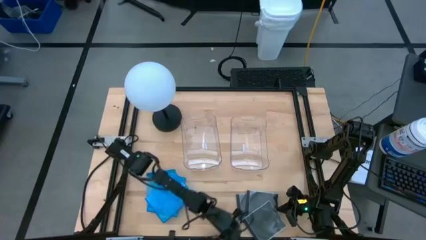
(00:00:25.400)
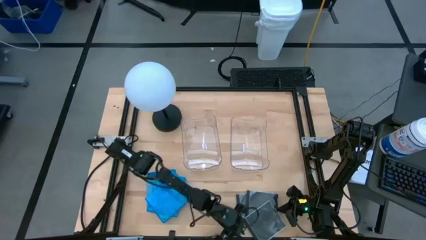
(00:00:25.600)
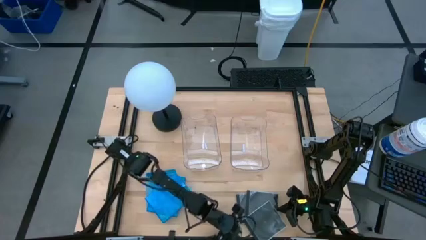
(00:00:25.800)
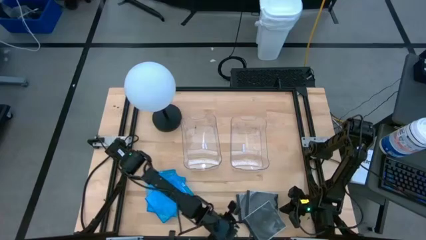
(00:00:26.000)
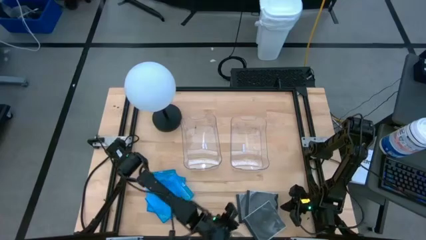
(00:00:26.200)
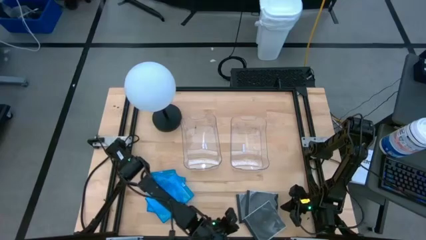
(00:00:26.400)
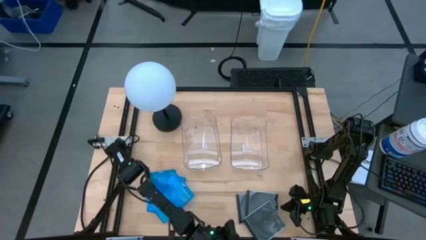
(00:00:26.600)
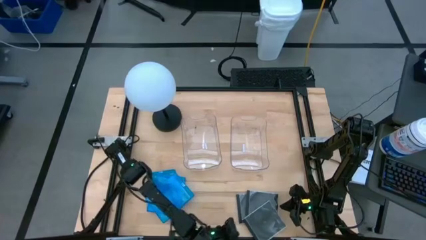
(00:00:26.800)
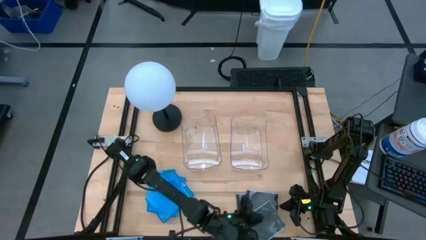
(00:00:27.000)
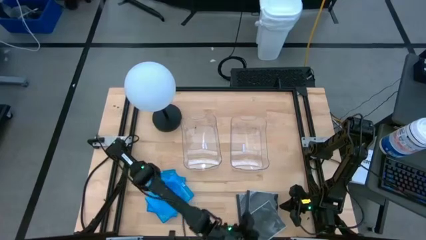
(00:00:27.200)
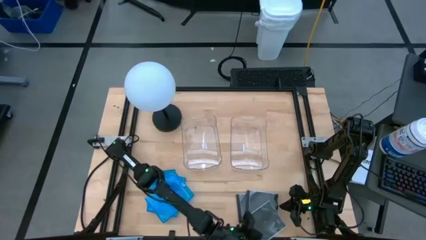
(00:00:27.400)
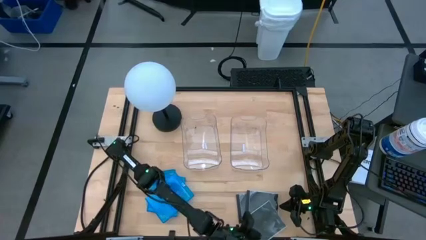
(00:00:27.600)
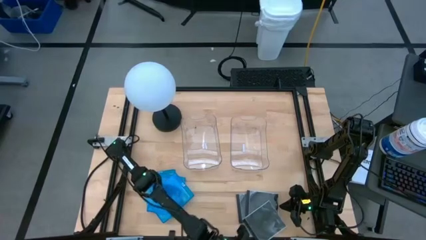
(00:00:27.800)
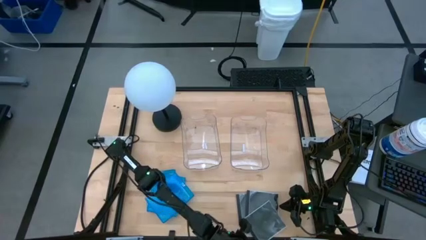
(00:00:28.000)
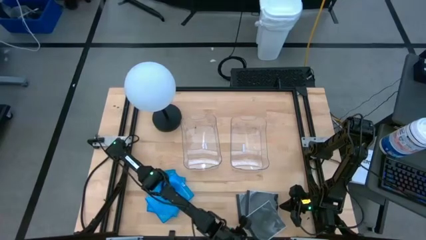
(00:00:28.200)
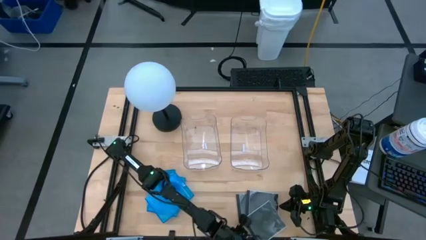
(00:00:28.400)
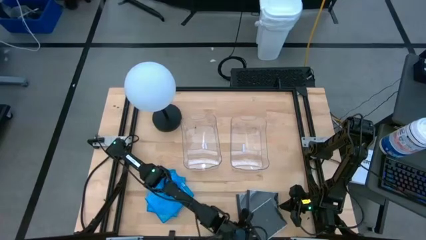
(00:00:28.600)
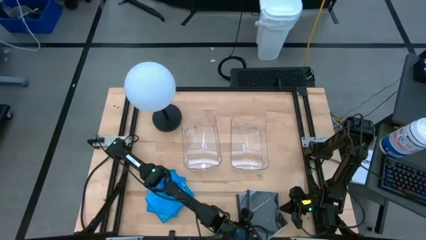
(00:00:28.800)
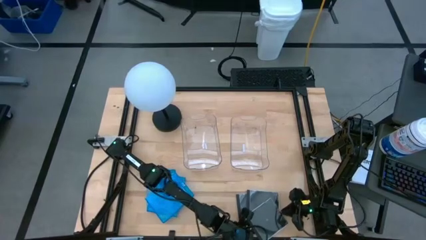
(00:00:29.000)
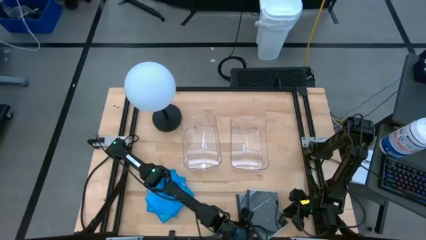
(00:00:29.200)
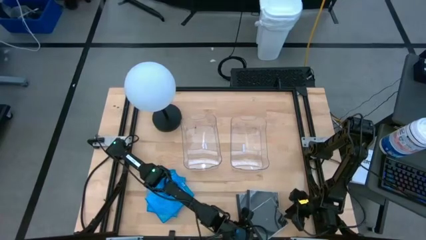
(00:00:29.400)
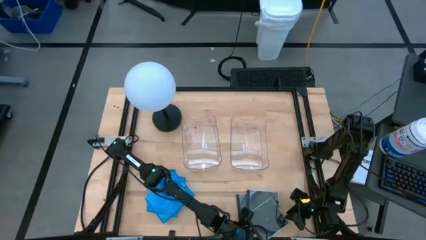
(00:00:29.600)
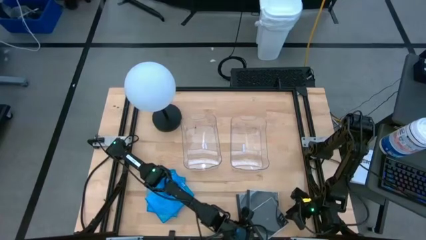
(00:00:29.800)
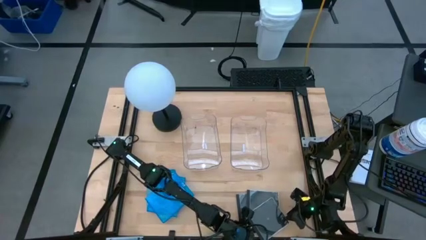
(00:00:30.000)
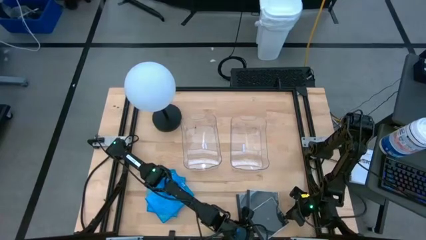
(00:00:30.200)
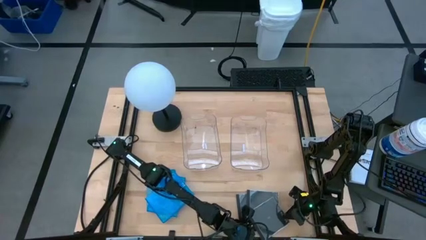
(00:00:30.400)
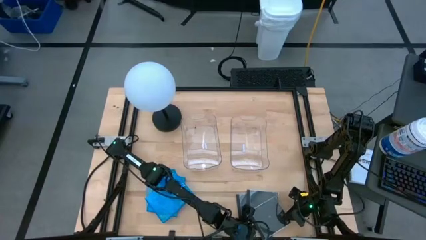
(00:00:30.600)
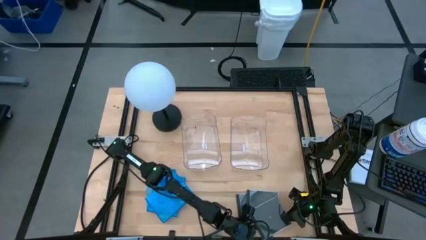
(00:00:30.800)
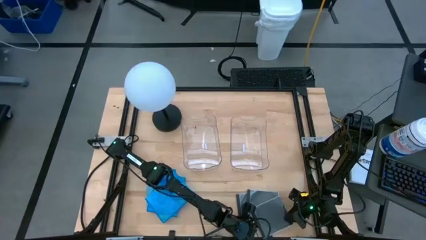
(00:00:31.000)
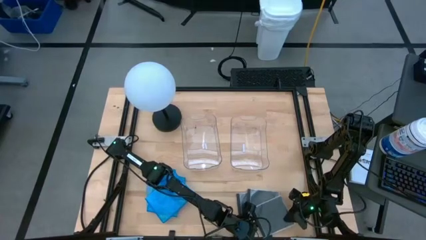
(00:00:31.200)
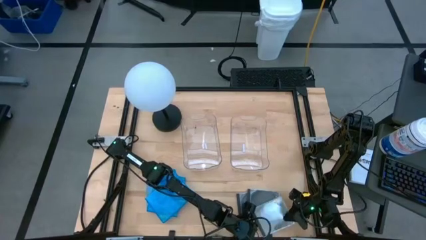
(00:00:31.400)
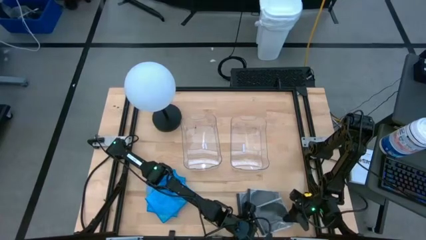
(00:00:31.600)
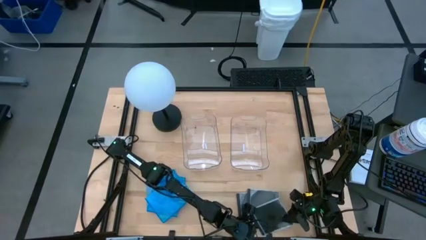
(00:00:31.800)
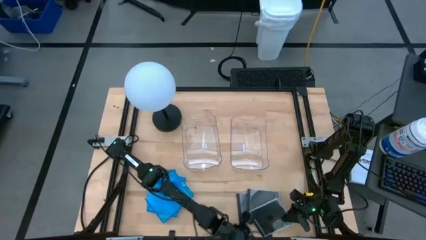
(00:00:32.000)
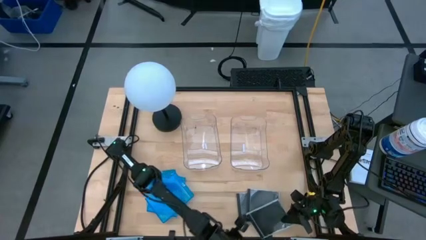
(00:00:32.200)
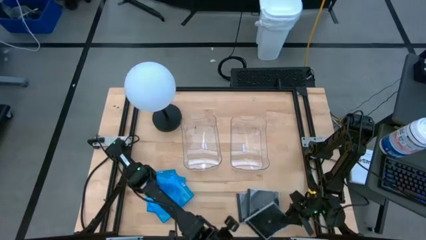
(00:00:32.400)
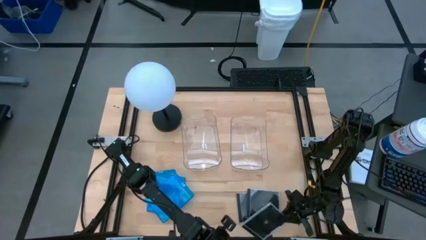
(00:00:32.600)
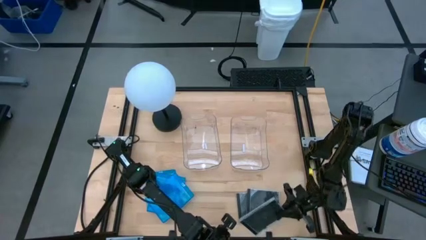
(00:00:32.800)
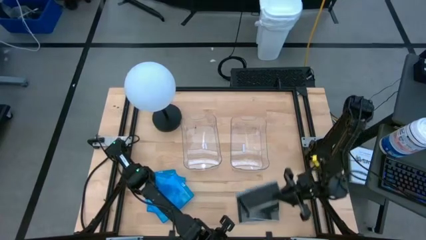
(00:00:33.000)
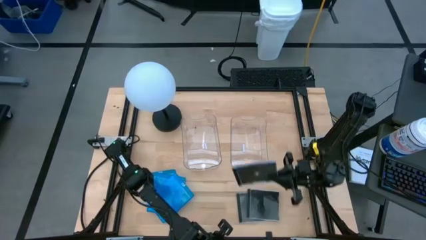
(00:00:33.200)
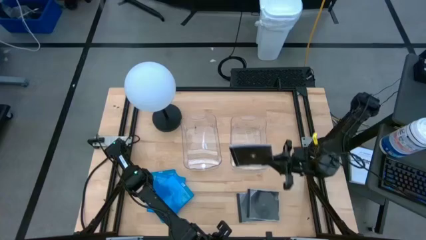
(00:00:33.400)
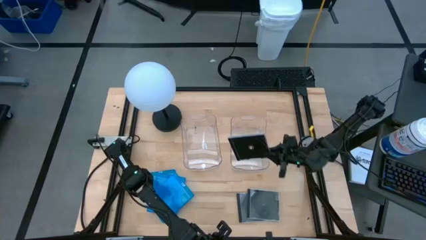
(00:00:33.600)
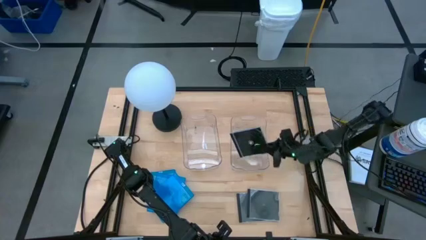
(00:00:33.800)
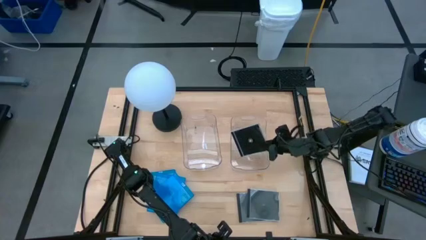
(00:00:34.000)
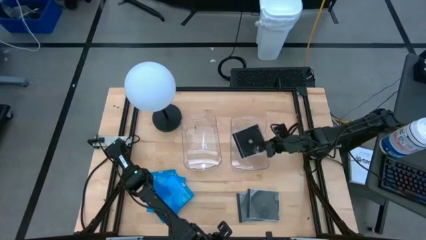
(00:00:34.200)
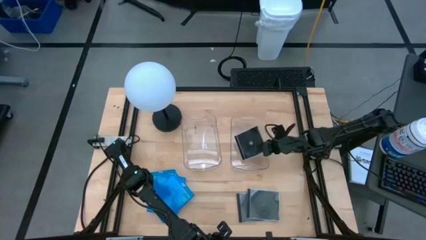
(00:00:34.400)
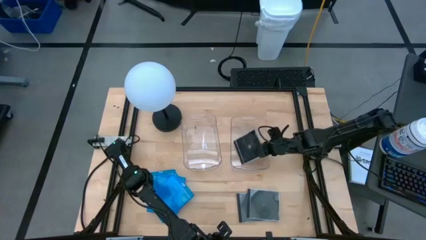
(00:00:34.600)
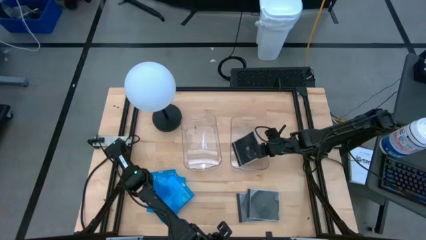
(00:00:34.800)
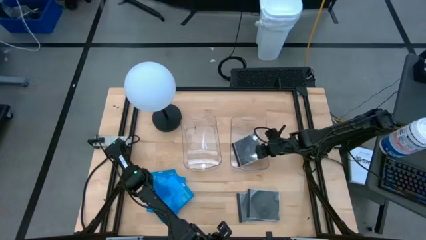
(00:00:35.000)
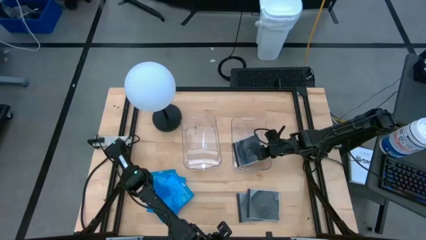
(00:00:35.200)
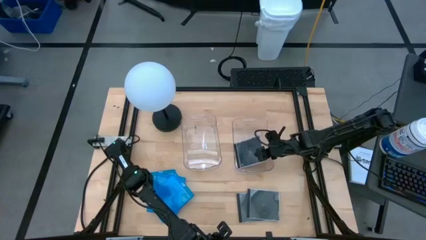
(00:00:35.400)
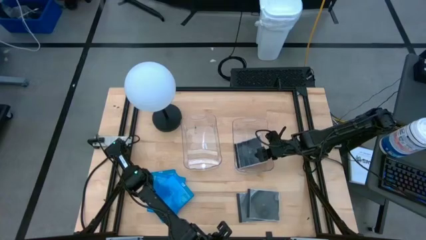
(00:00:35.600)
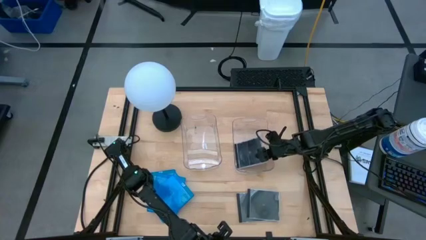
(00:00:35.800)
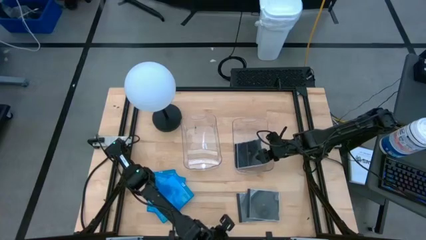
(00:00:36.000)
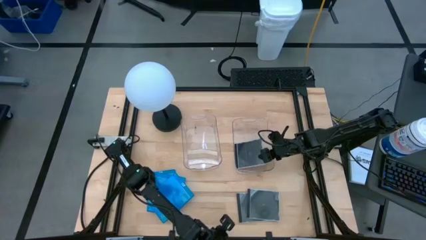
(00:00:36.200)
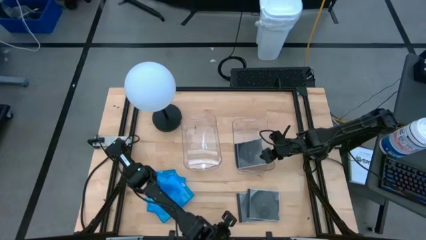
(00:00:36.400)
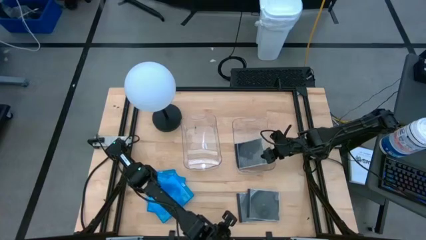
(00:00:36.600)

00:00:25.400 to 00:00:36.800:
Task: Pick & place jewel cases by type
Put the black CD case into the right transparent bin

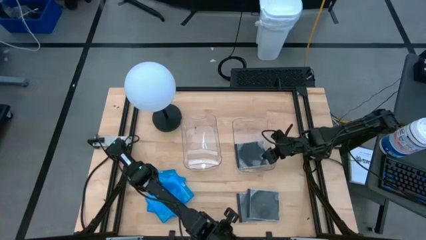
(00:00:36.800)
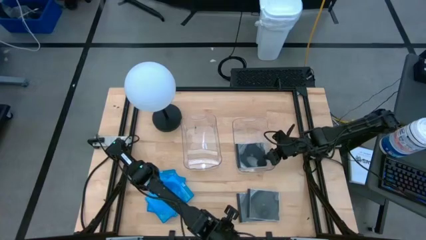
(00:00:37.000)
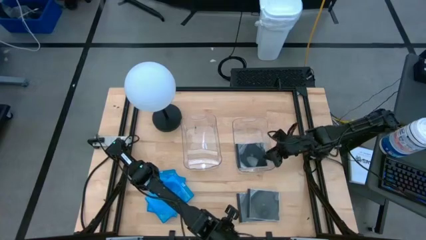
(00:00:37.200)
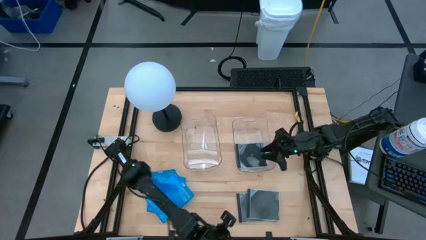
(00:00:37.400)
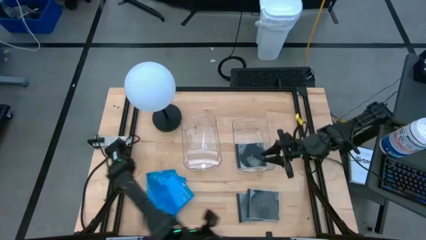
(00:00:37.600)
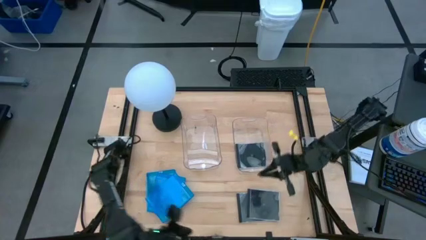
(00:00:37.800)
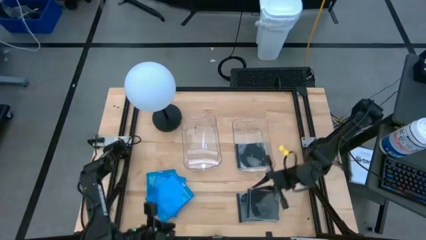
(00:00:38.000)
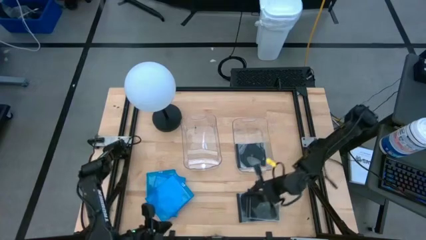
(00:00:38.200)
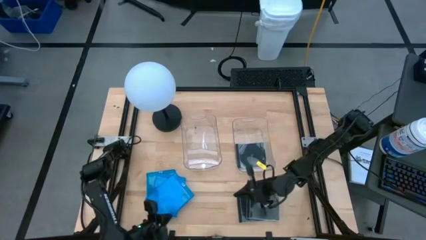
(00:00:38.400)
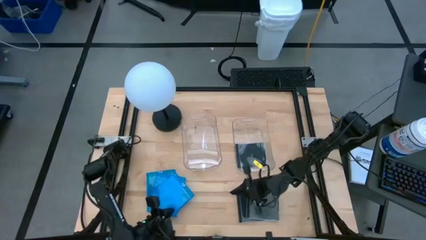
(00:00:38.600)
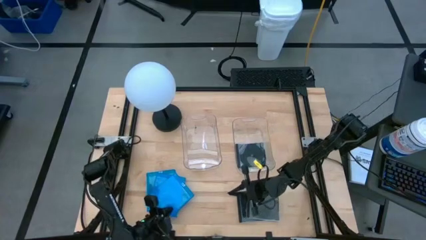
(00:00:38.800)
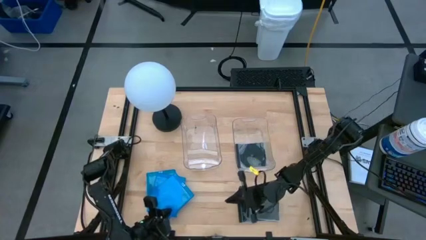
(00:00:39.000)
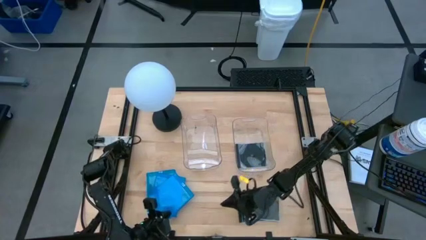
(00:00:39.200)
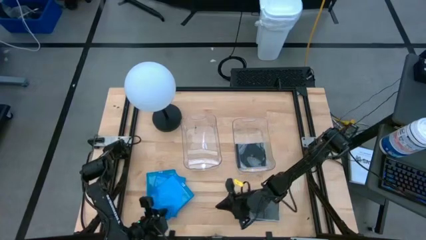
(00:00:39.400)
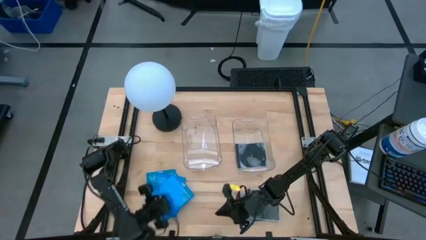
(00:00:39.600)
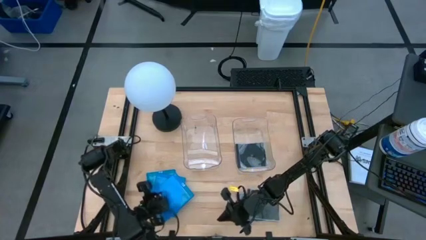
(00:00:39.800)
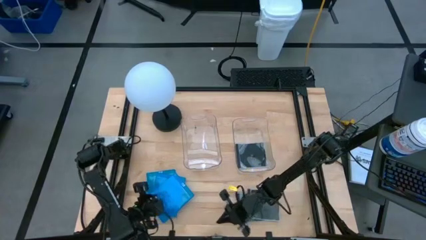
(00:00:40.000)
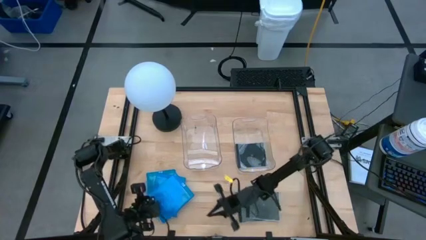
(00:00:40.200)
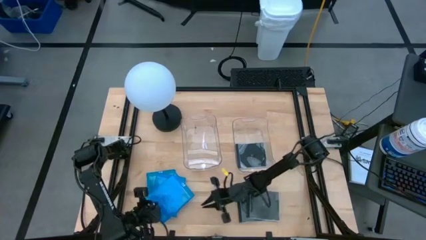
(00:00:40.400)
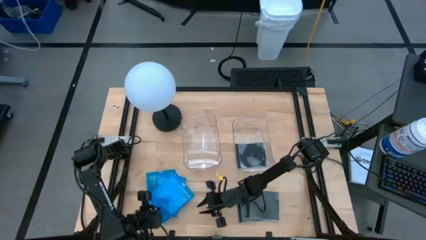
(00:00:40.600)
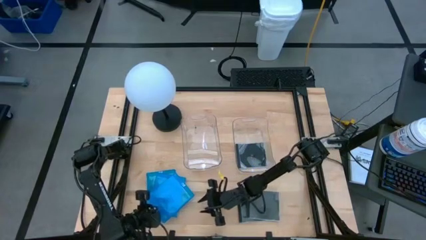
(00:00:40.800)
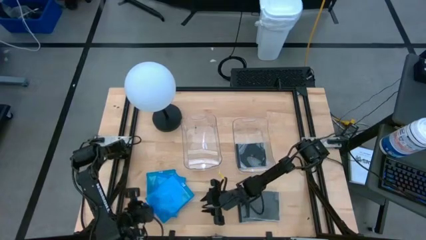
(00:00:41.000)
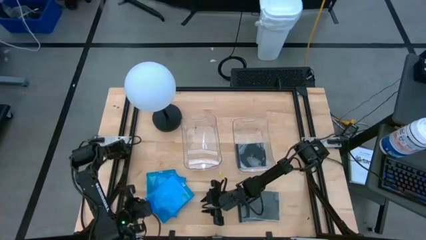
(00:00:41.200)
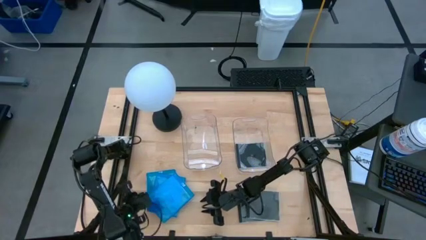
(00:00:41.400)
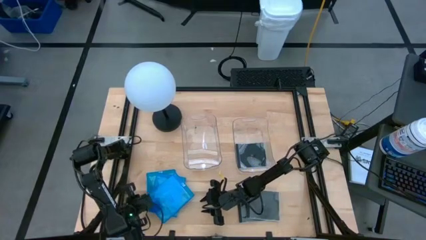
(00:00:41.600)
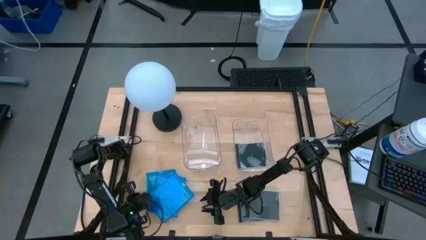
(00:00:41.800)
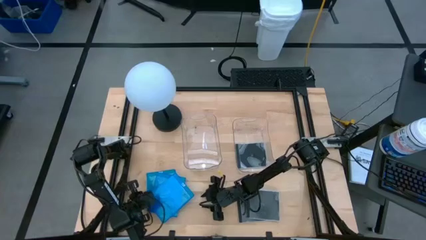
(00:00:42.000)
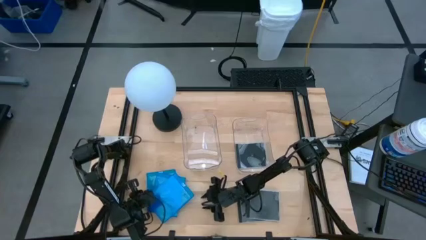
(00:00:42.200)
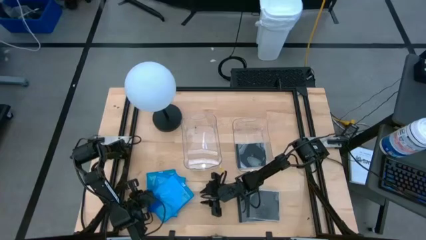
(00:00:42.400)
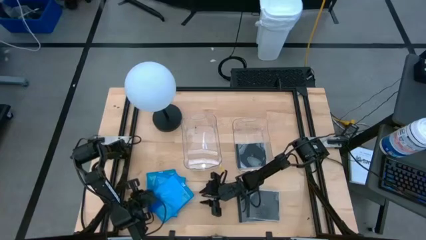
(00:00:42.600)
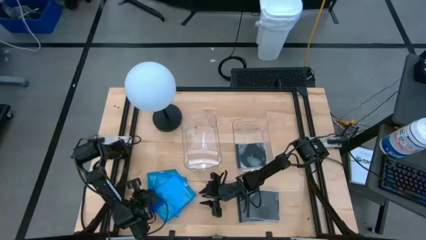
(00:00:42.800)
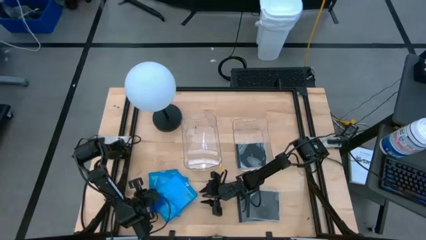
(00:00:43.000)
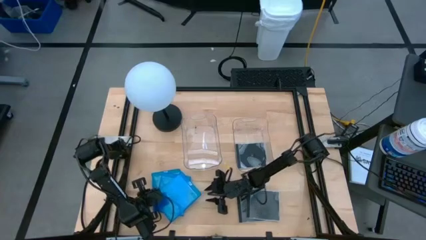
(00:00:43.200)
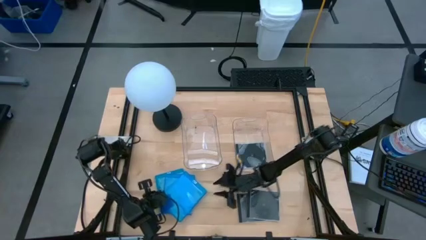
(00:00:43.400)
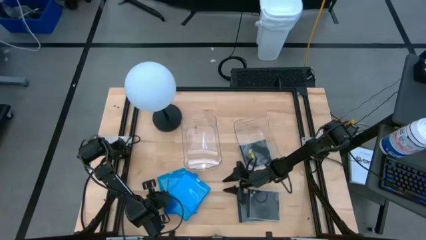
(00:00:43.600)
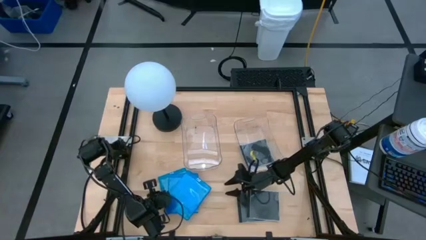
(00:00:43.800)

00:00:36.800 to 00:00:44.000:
Move the blue CD cases on the table
